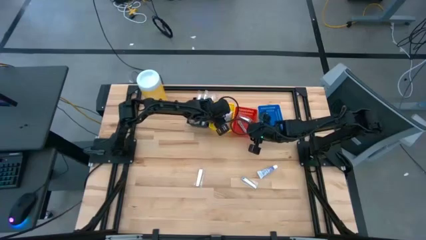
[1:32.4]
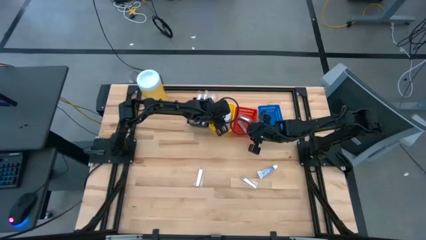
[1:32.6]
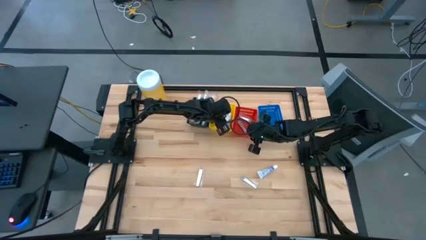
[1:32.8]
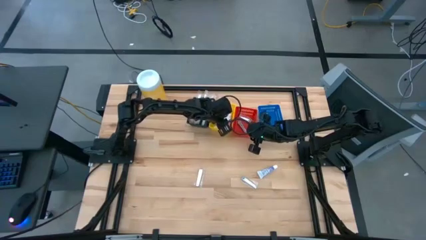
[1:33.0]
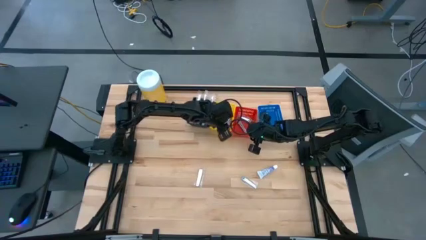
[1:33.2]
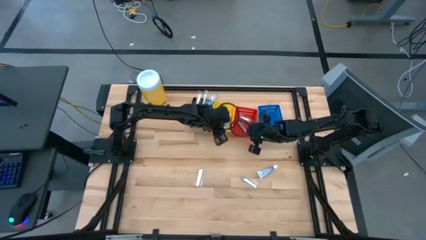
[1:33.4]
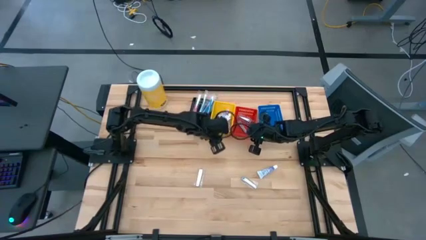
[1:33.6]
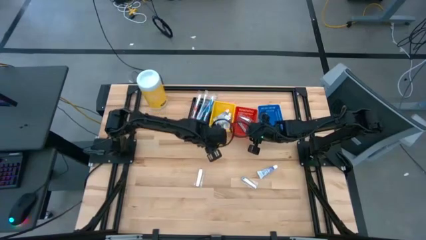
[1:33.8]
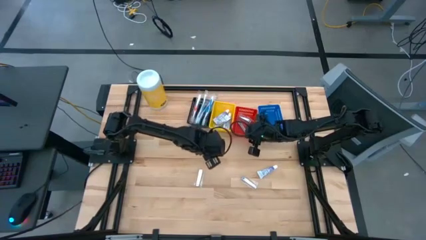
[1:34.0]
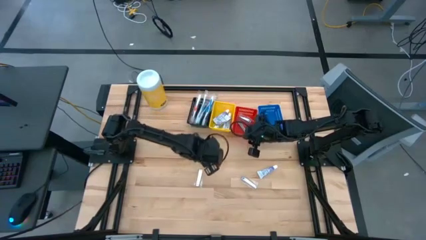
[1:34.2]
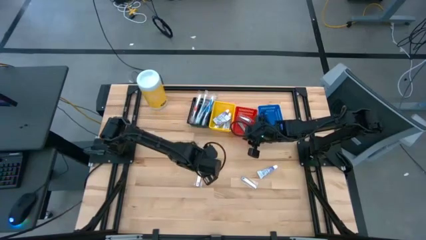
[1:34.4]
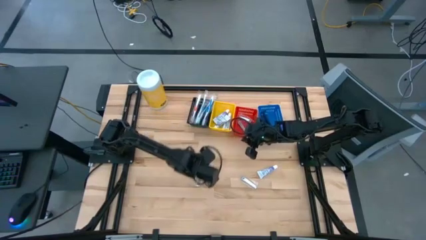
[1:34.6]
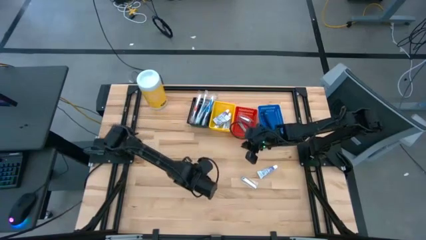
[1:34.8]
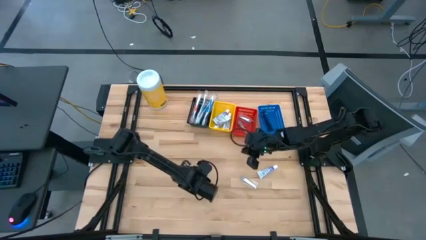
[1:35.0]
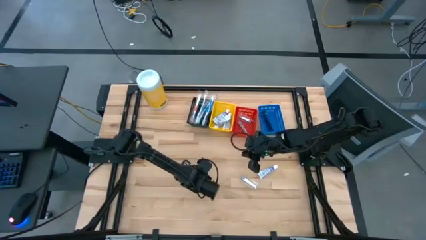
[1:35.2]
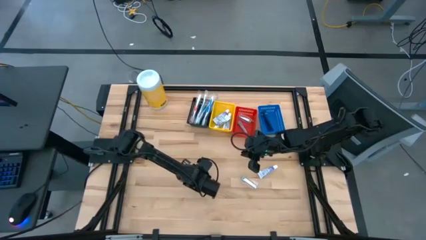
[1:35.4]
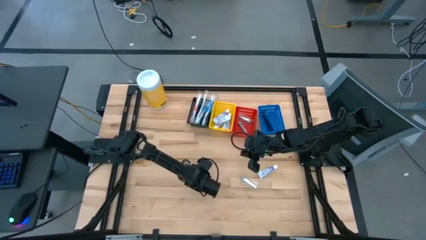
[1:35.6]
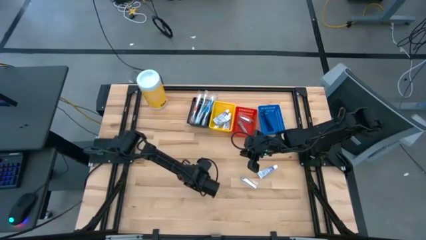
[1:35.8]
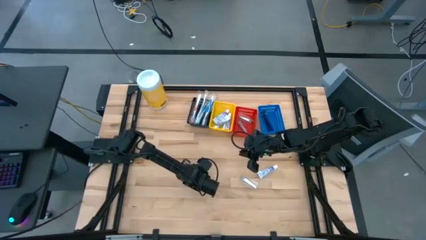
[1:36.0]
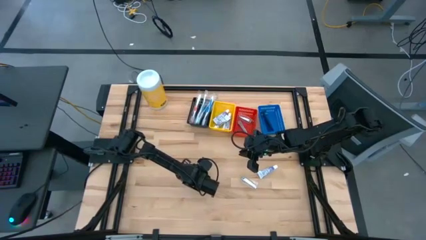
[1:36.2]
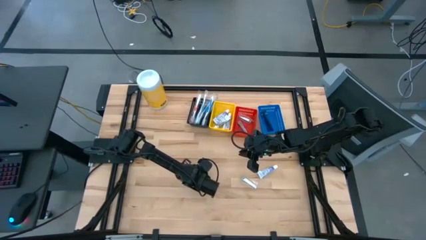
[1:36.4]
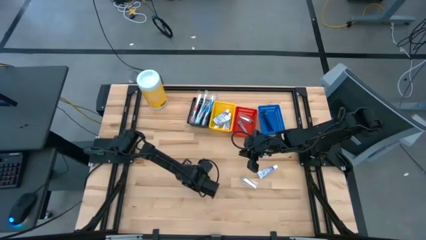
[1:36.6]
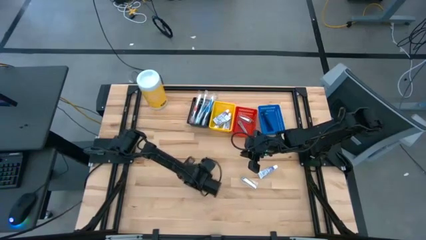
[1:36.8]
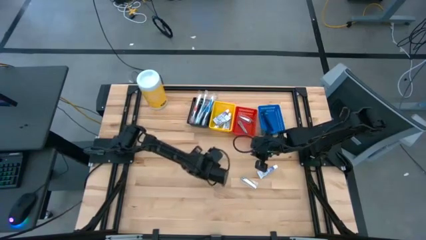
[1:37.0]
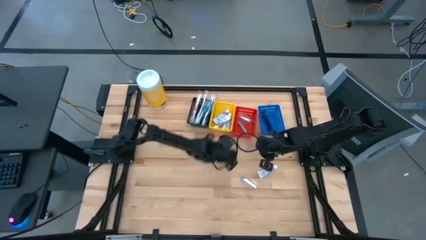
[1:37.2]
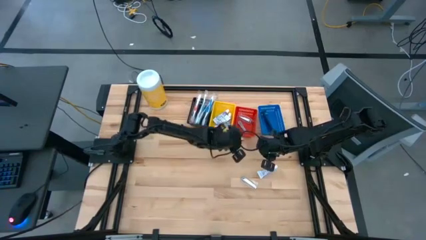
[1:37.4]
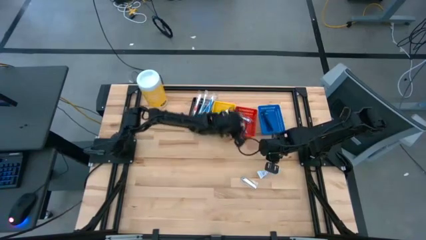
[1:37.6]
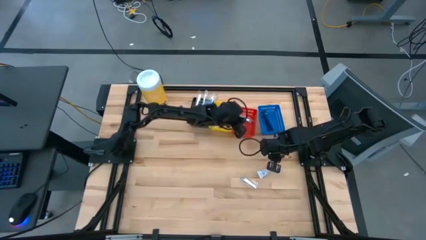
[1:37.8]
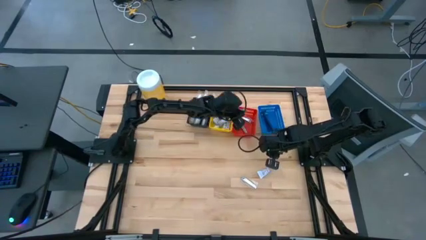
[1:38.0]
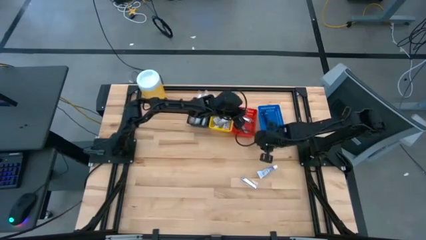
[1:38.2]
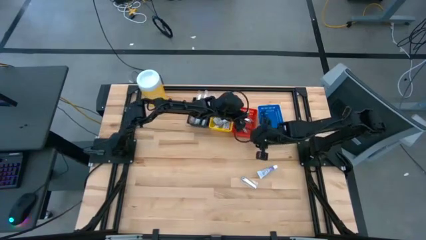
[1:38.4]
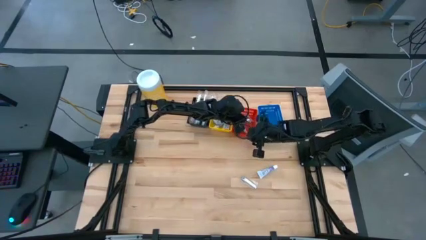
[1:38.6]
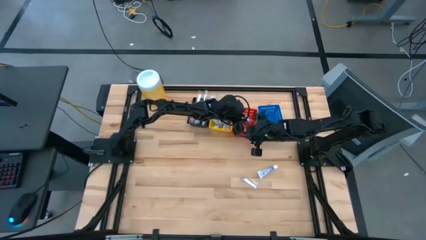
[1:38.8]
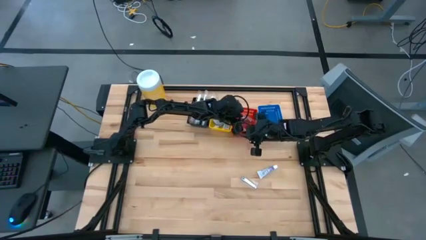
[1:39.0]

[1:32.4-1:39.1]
Task: Pick & Place Travel size toiletries
Put the silver nail cutter into the red bin

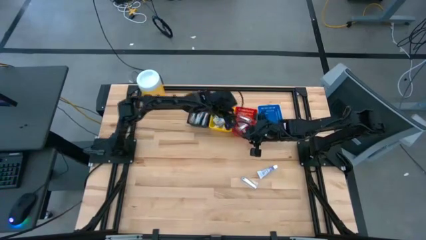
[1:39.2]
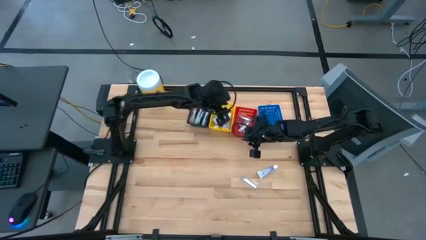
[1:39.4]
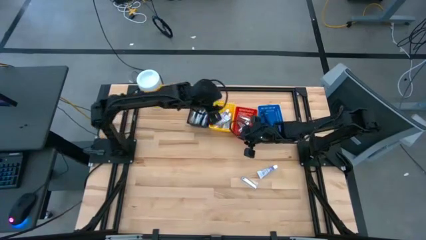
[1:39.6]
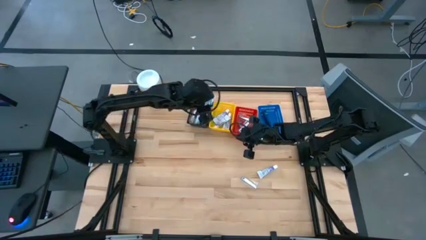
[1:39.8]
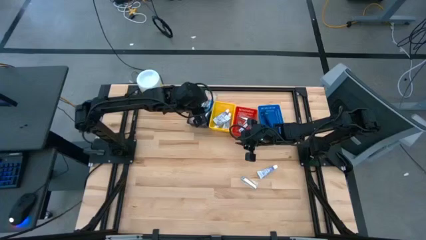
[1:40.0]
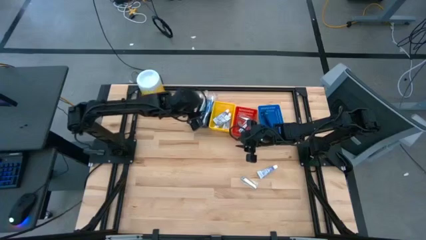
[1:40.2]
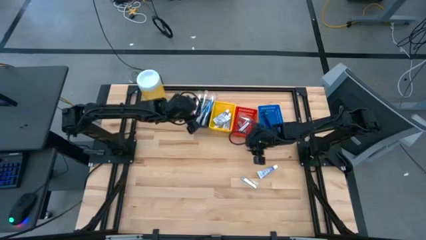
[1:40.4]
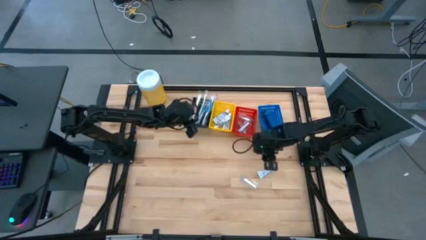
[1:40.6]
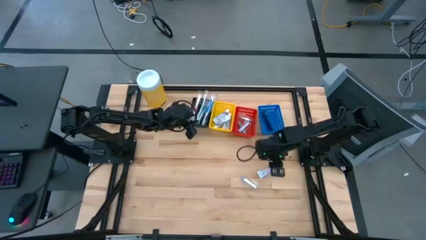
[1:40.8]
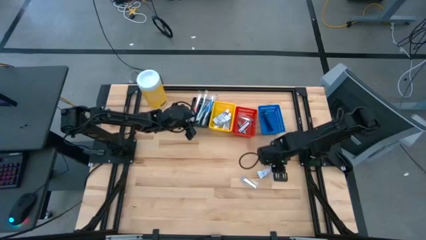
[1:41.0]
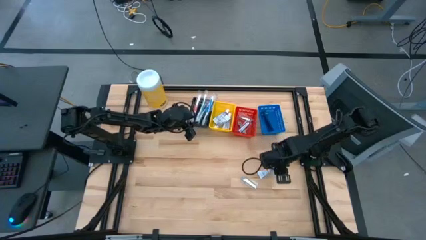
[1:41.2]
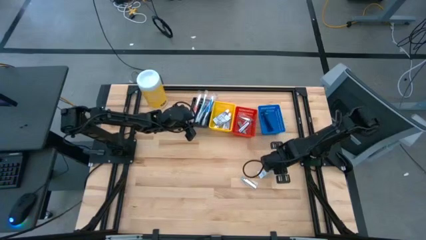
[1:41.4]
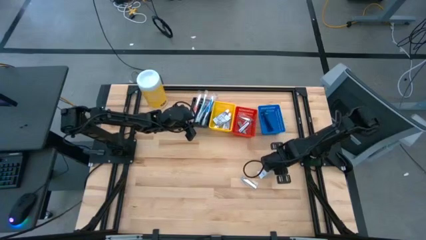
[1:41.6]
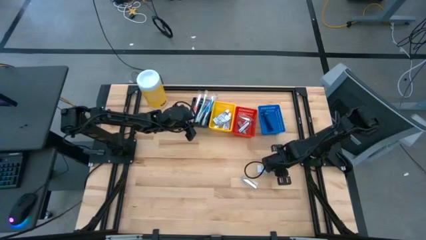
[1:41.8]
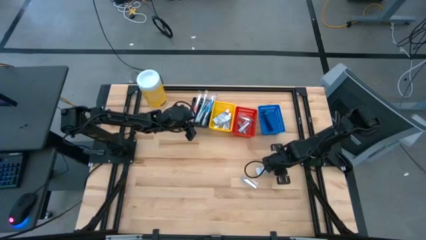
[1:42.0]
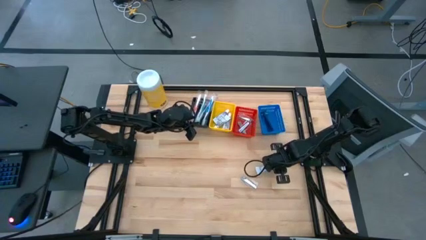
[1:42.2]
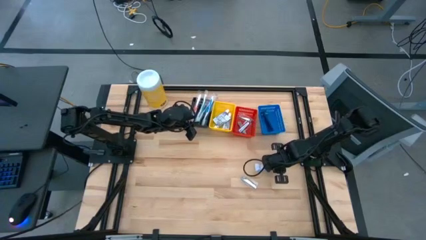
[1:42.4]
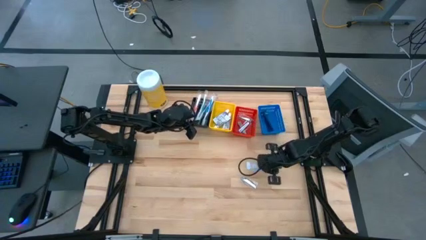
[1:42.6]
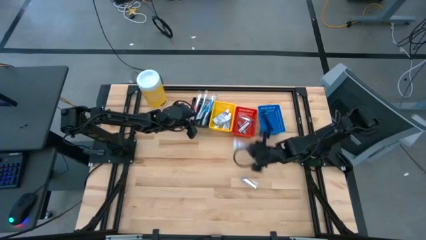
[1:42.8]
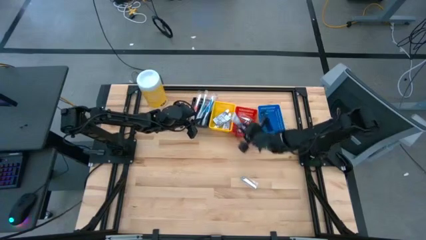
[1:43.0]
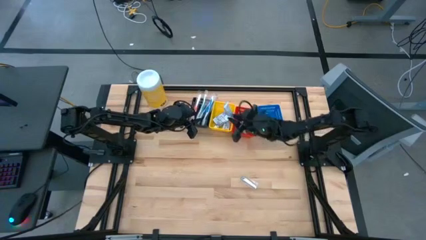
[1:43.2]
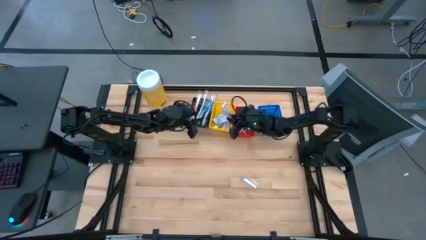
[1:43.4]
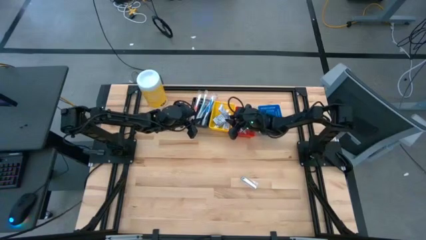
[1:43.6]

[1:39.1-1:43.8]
Put the white toothpaste into the yellow bin

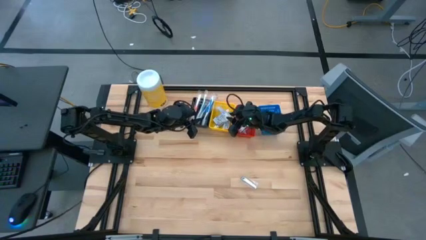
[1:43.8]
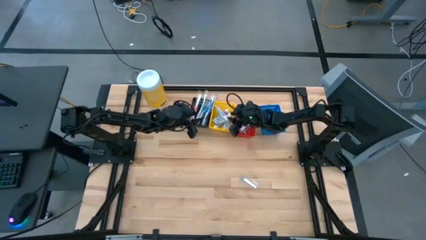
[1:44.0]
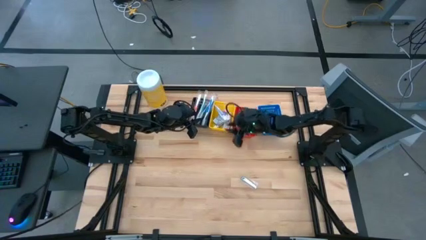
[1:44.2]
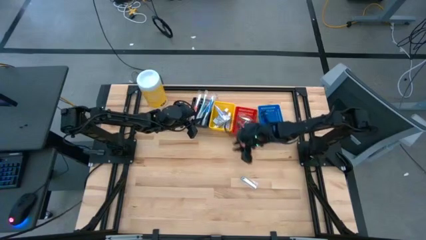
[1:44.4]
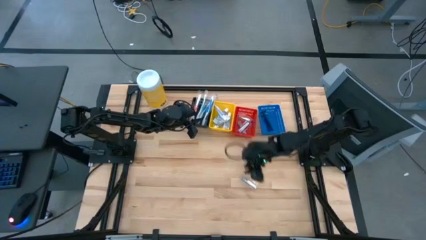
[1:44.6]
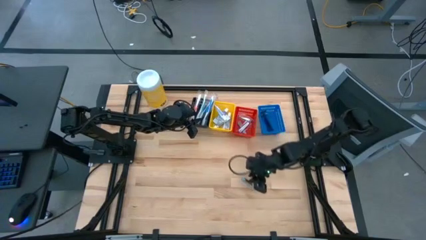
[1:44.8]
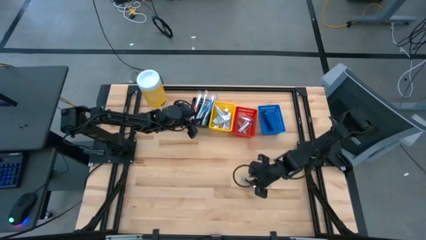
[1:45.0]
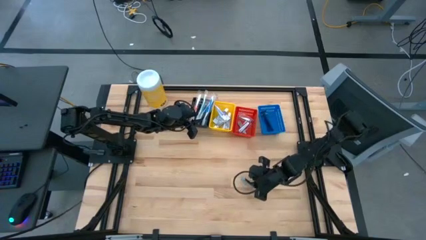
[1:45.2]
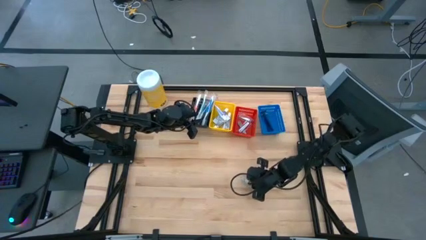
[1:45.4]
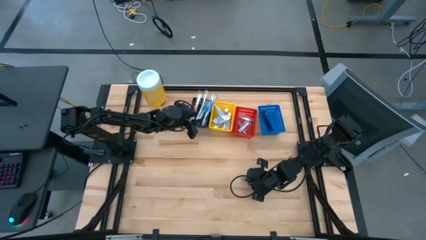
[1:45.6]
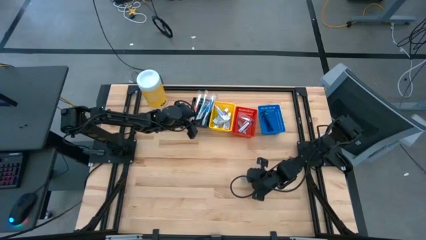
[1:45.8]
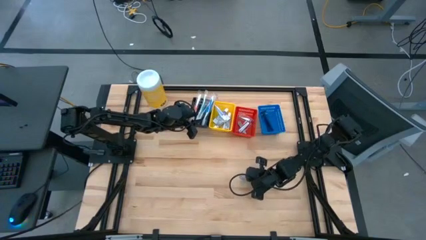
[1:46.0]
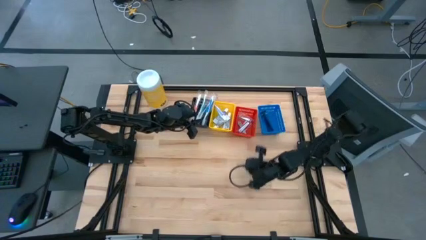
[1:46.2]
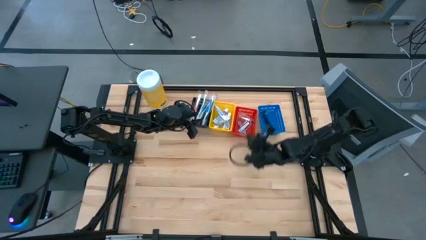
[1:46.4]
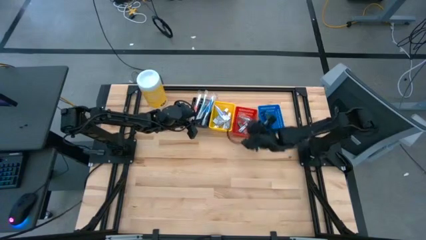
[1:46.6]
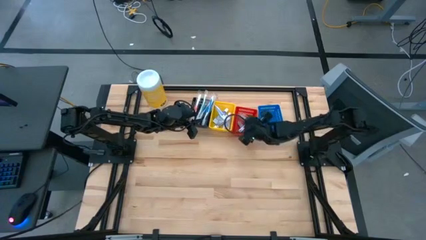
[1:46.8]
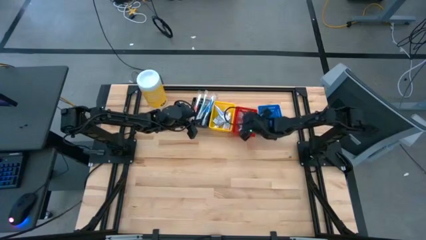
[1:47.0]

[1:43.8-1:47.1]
Put the silver nail cutter into the red bin
